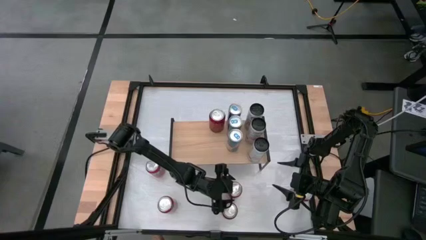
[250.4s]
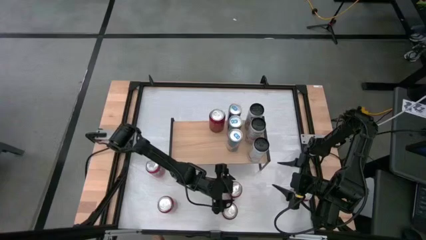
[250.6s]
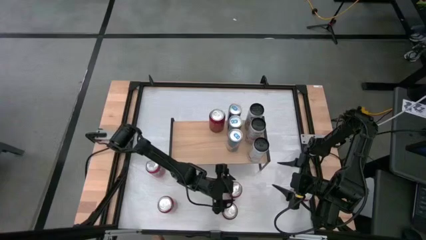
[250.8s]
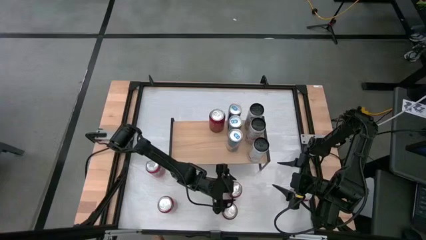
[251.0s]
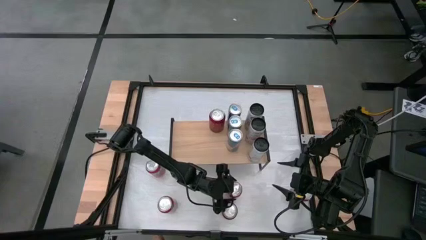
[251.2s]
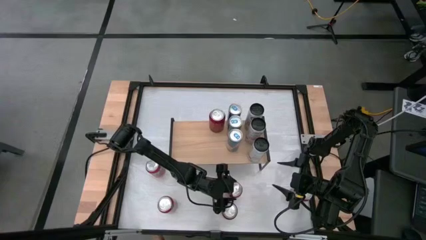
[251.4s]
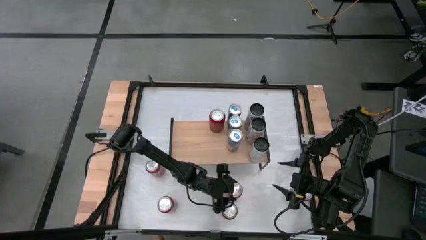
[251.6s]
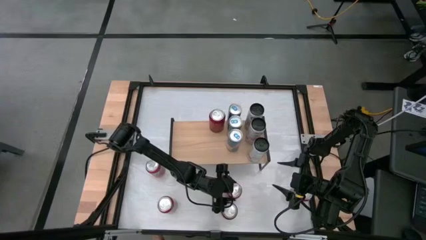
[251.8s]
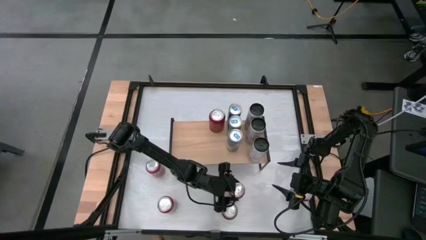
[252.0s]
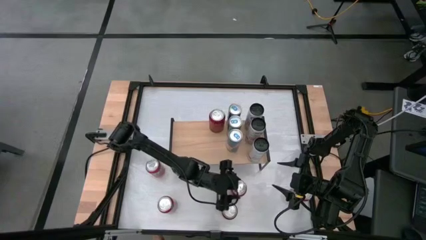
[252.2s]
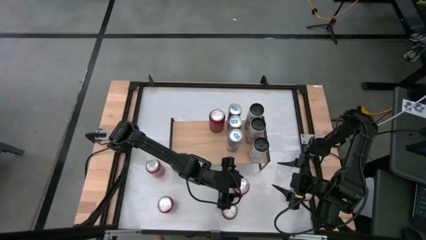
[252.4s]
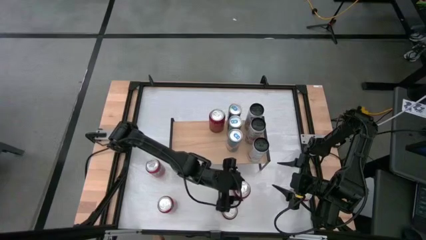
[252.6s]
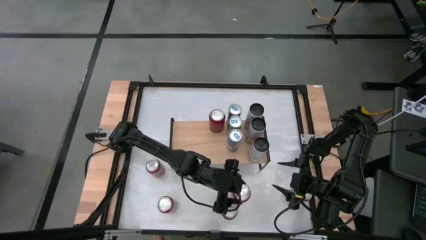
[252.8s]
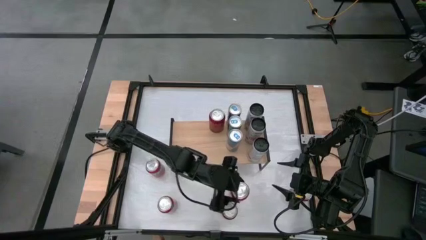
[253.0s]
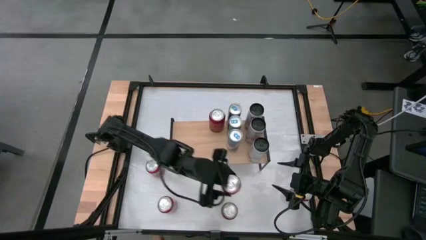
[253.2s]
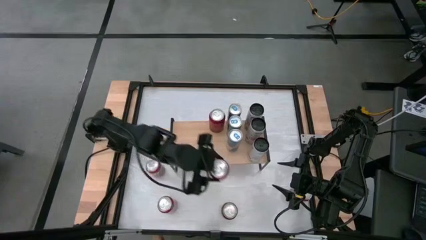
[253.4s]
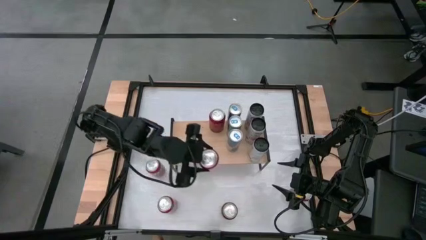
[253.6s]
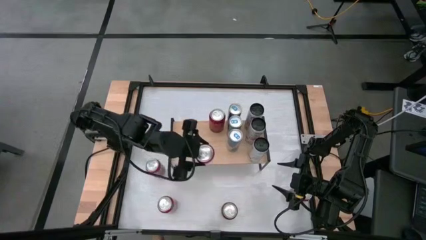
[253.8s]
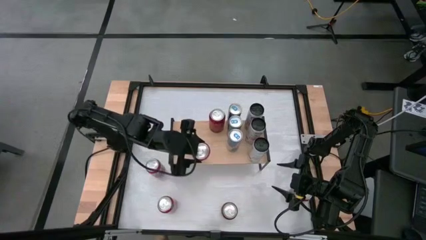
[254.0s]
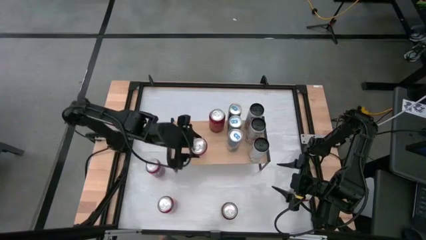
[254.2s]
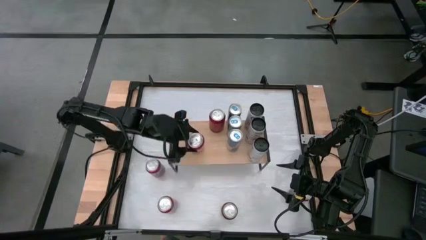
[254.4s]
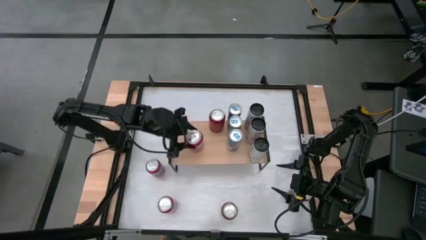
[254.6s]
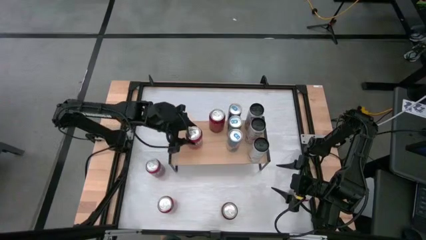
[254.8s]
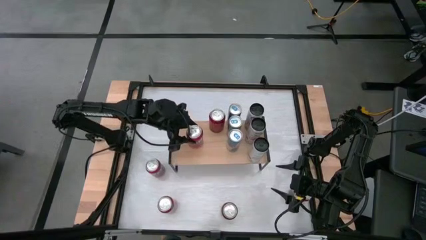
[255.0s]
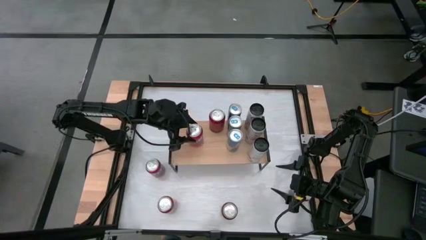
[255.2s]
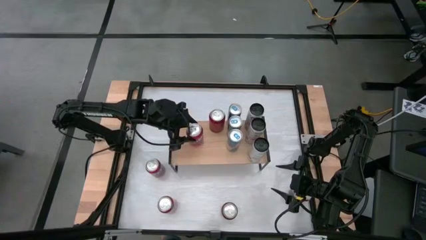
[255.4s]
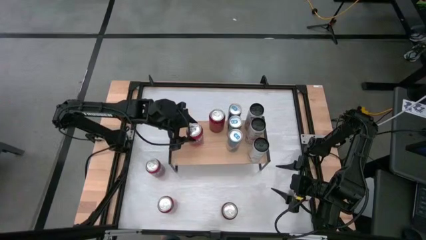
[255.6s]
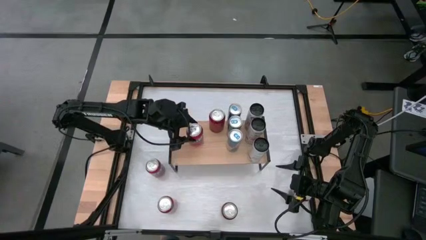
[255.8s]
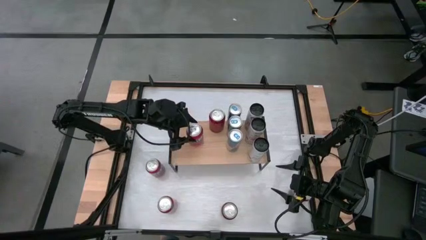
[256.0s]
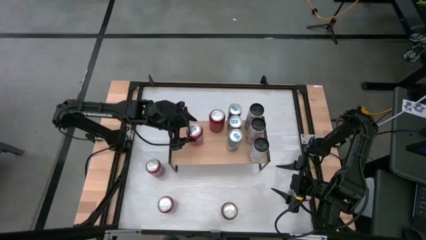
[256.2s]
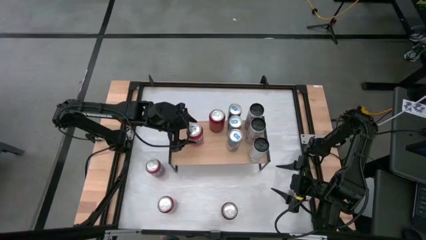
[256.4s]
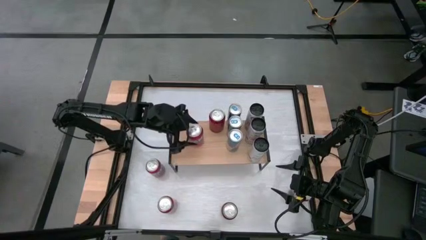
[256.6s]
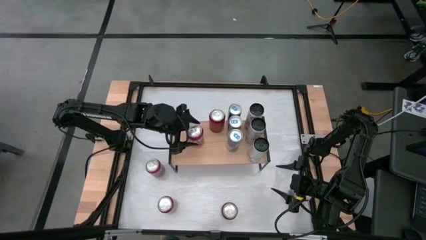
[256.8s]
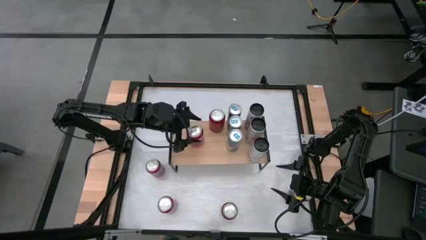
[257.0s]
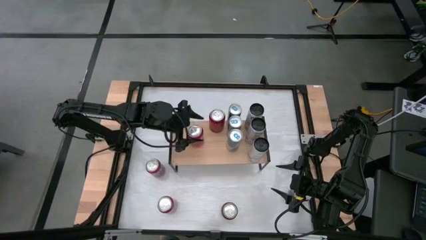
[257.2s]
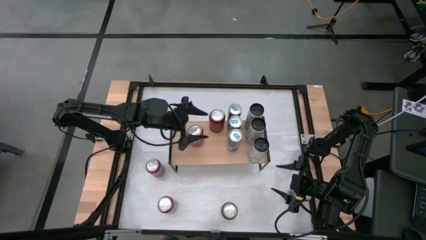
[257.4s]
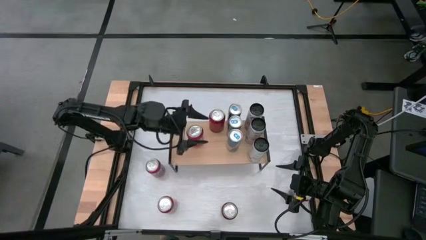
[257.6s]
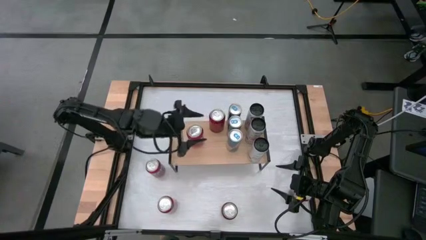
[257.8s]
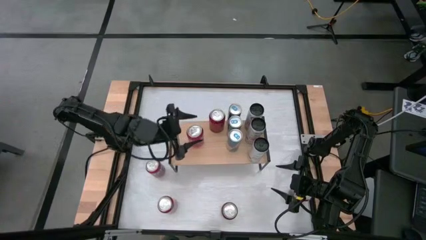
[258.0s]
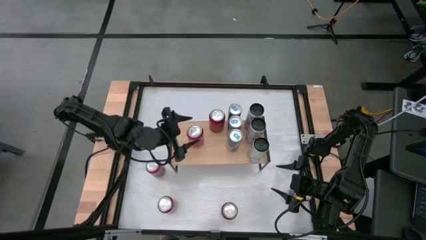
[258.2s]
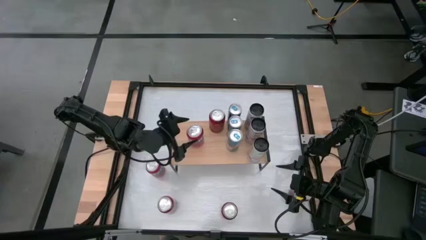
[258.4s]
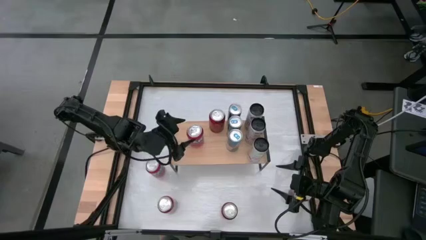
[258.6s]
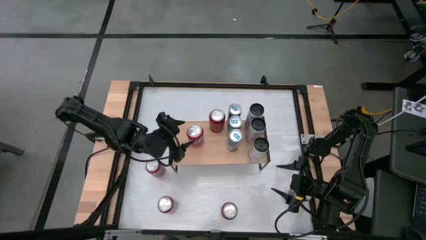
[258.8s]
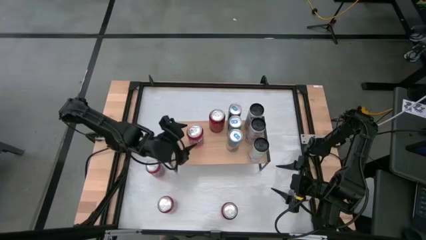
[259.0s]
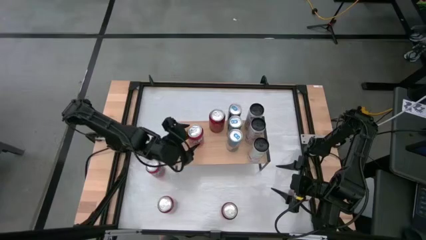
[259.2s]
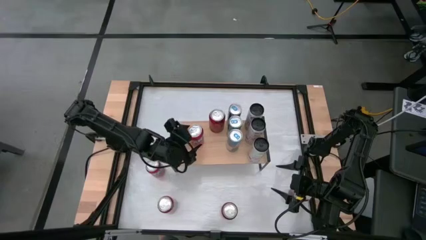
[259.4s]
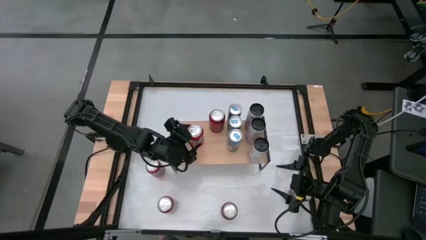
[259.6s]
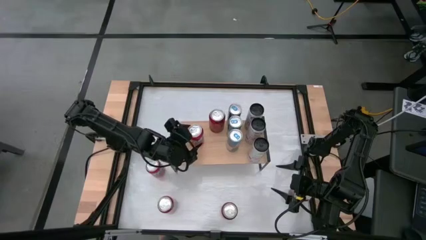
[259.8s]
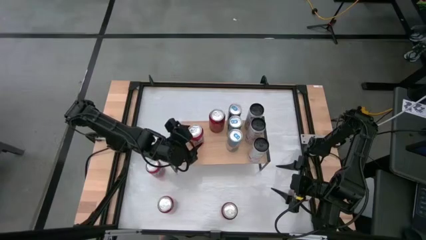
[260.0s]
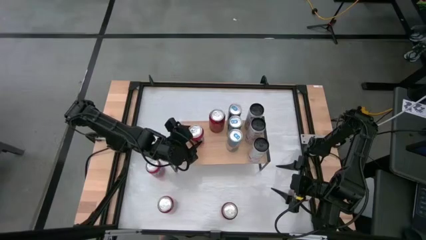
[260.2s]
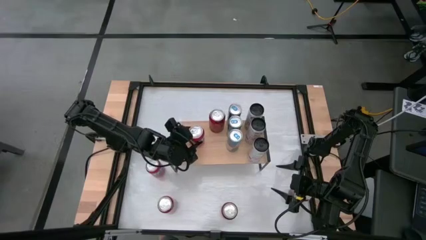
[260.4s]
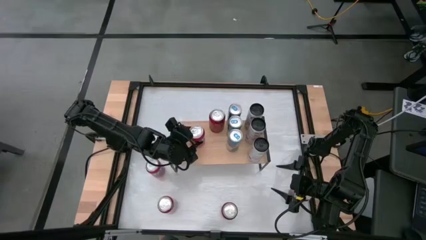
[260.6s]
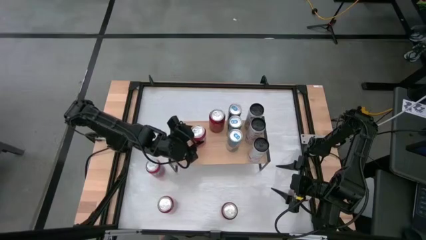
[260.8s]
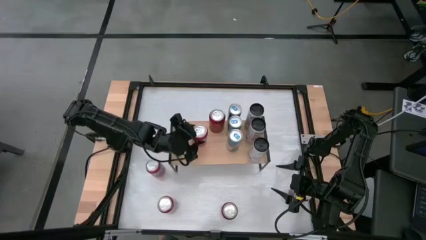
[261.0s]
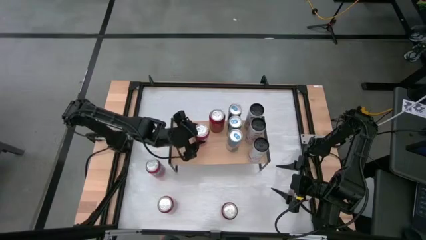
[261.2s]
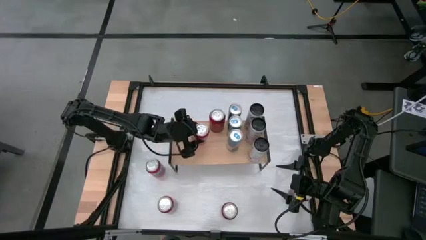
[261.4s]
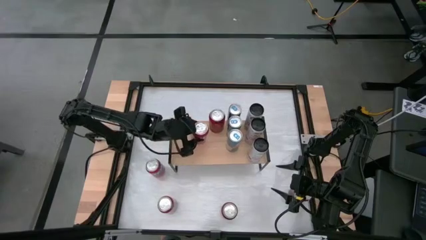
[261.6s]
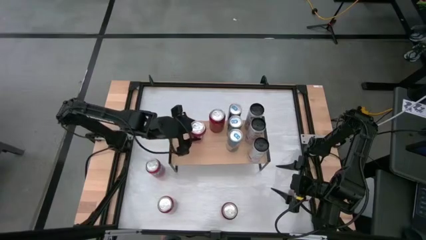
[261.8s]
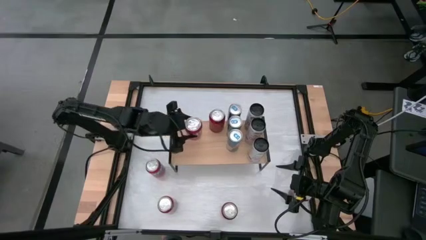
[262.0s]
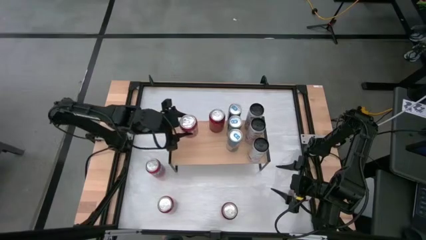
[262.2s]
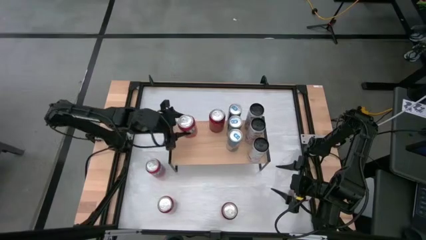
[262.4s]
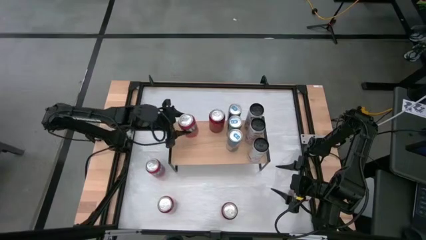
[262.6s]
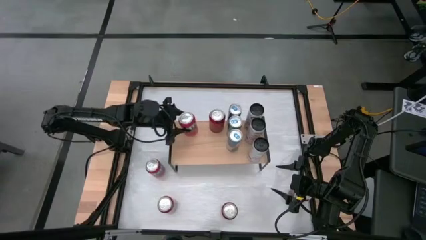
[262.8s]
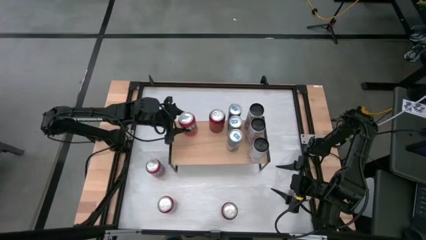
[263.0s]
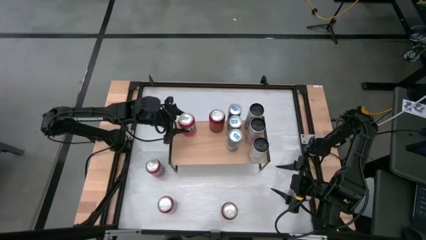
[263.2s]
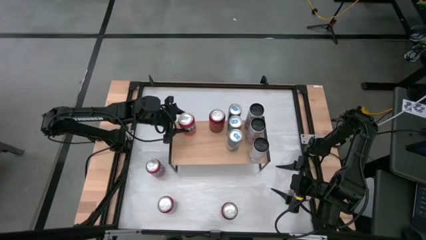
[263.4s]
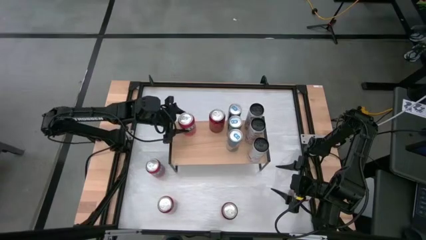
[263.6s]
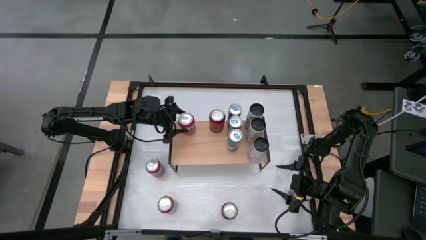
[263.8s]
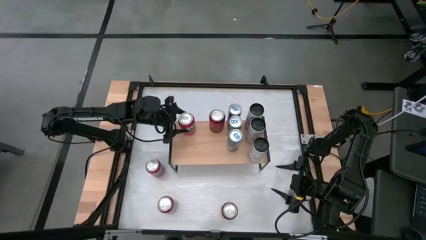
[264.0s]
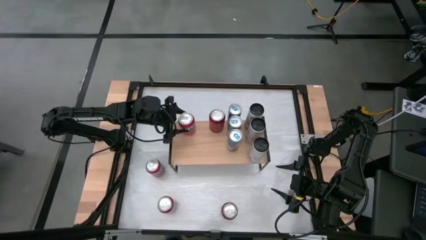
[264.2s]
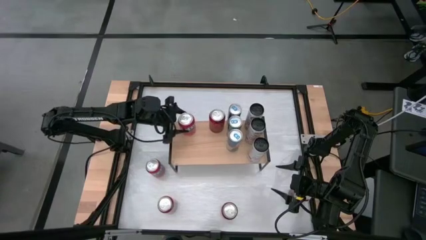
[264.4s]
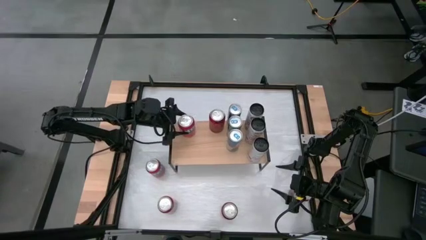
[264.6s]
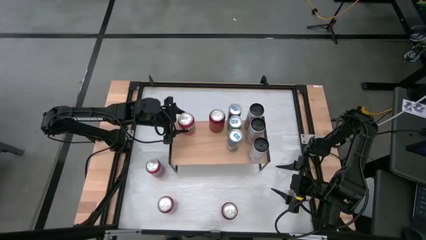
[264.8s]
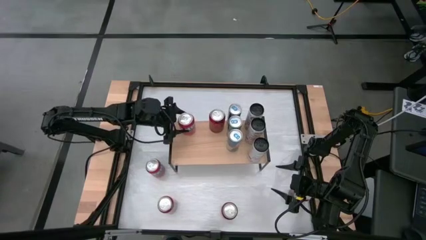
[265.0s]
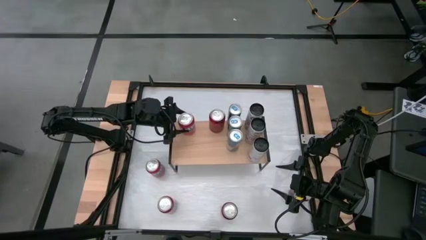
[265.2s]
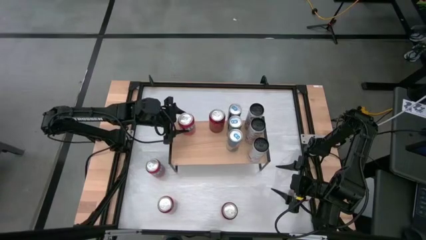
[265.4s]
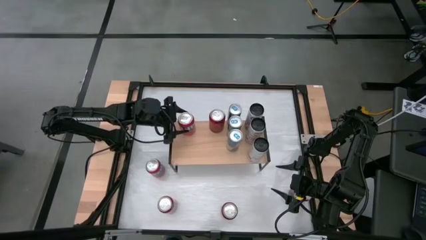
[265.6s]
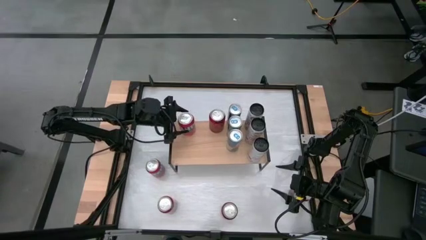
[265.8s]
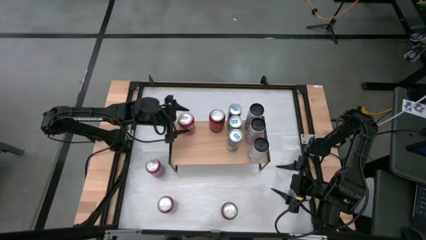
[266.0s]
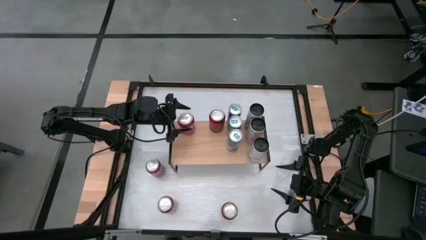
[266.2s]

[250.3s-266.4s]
Task: Place canned beverage on shelf
Put the top right red soda can on the shelf
